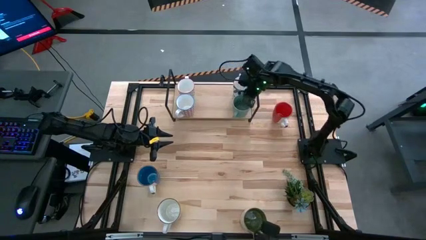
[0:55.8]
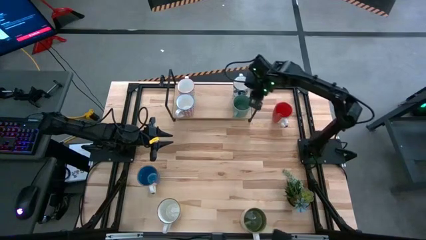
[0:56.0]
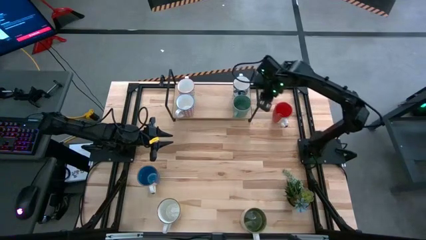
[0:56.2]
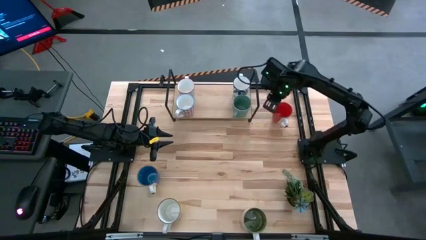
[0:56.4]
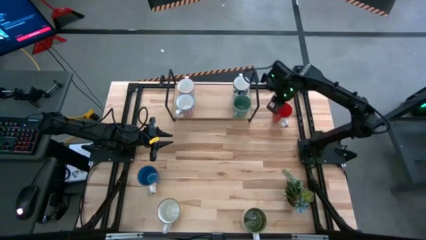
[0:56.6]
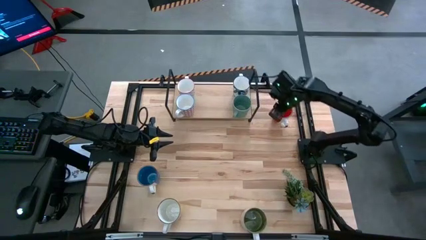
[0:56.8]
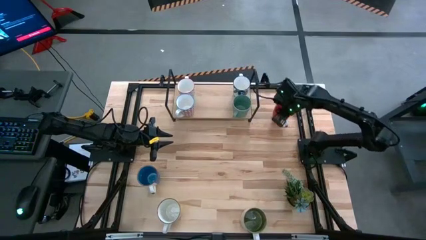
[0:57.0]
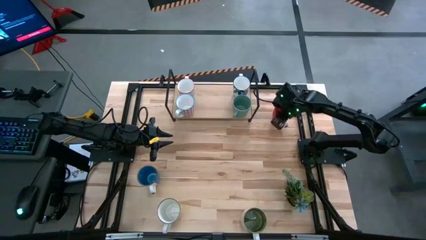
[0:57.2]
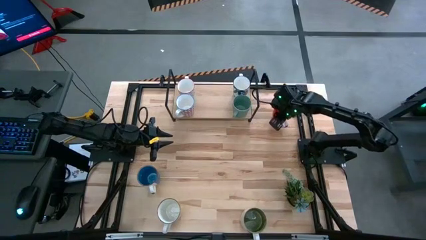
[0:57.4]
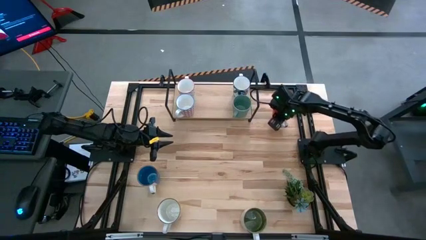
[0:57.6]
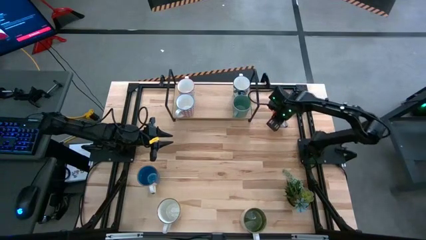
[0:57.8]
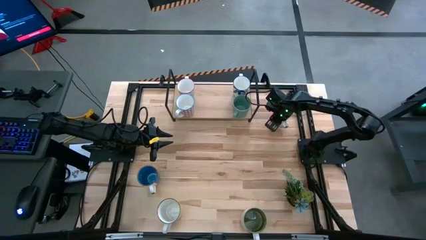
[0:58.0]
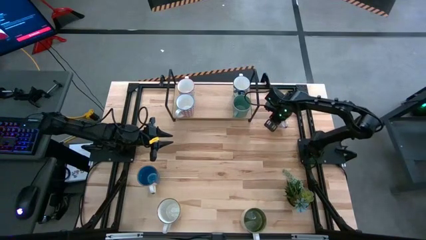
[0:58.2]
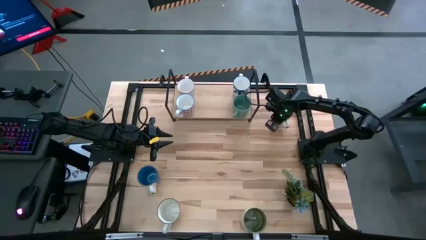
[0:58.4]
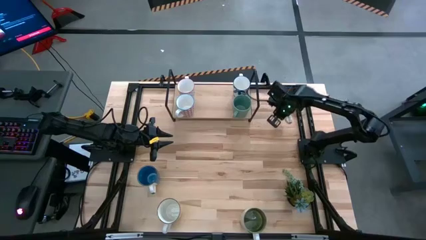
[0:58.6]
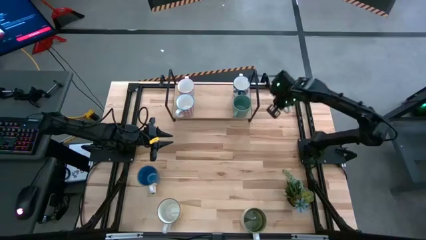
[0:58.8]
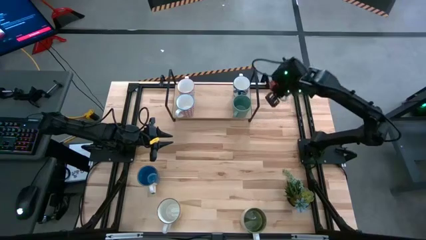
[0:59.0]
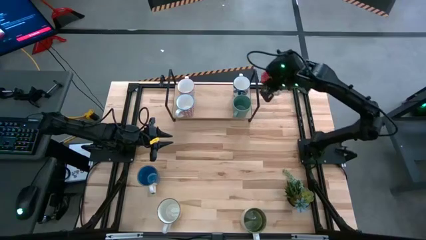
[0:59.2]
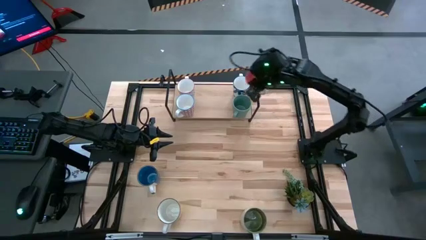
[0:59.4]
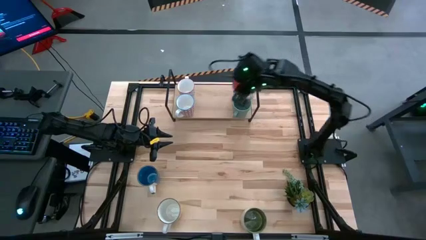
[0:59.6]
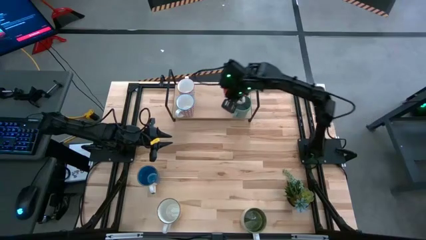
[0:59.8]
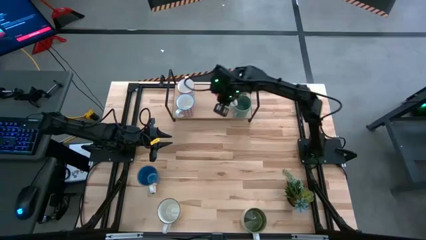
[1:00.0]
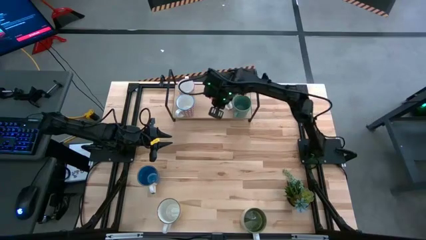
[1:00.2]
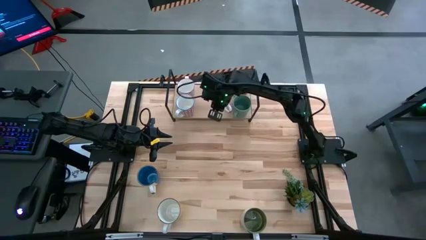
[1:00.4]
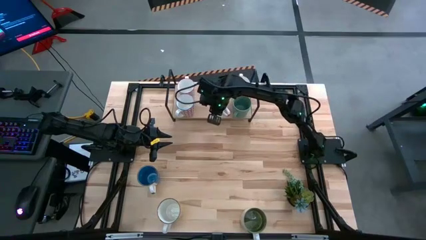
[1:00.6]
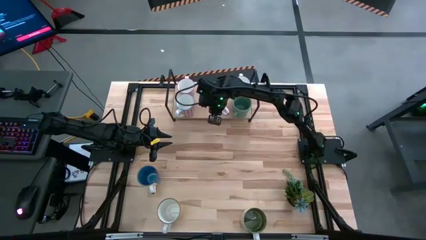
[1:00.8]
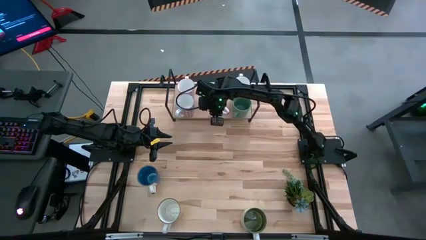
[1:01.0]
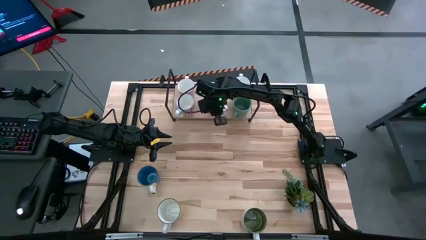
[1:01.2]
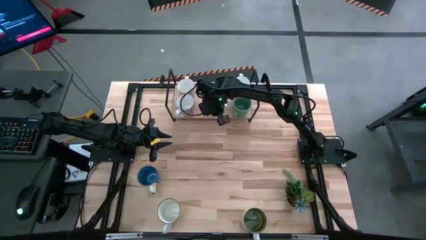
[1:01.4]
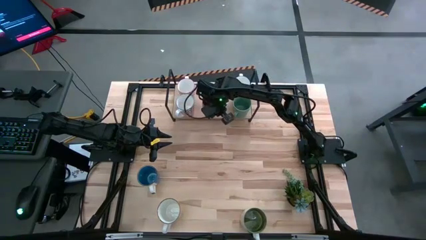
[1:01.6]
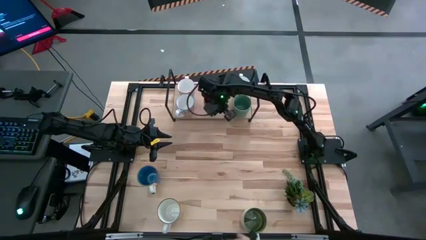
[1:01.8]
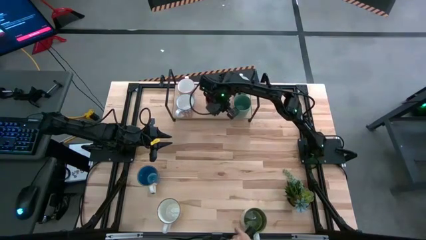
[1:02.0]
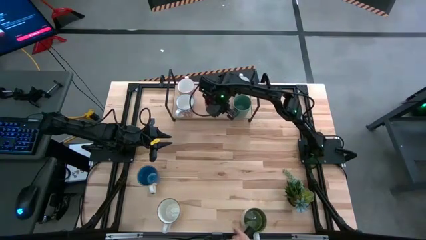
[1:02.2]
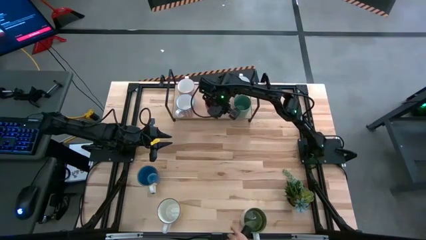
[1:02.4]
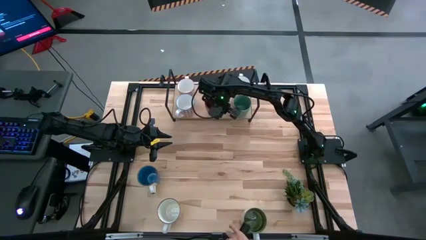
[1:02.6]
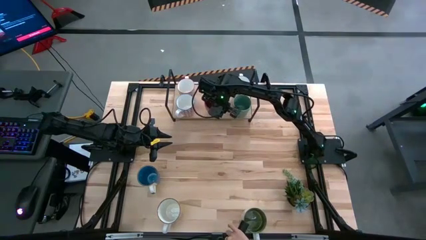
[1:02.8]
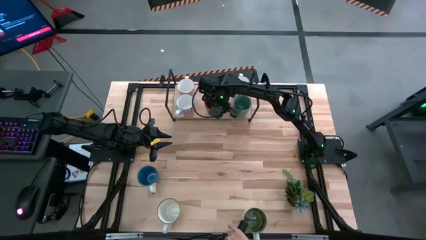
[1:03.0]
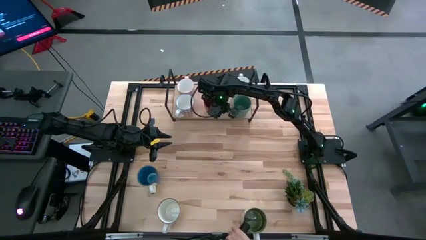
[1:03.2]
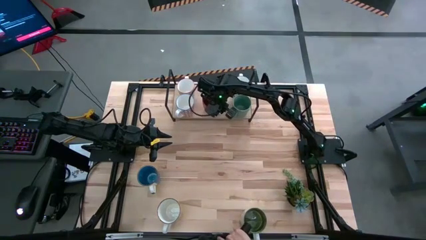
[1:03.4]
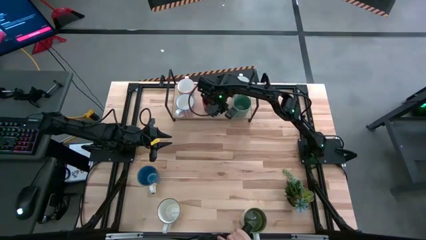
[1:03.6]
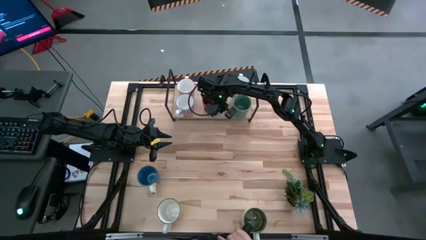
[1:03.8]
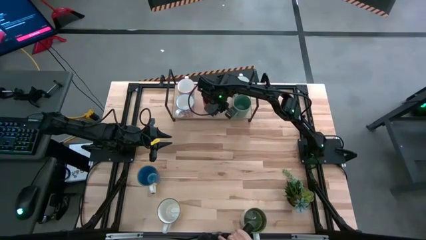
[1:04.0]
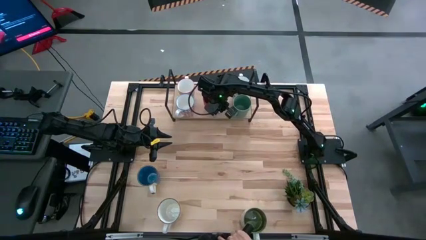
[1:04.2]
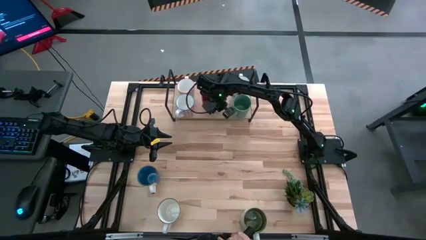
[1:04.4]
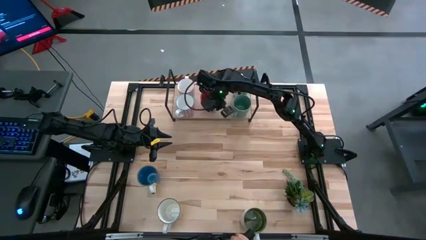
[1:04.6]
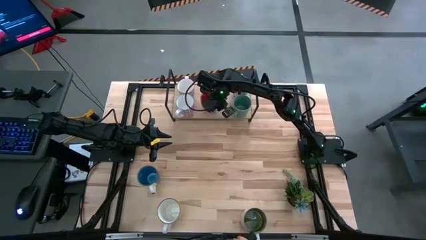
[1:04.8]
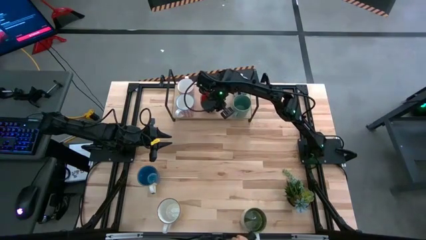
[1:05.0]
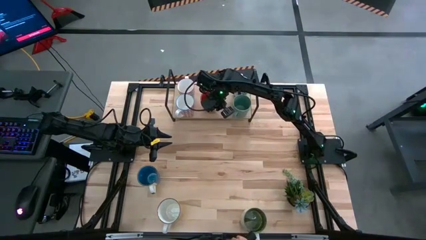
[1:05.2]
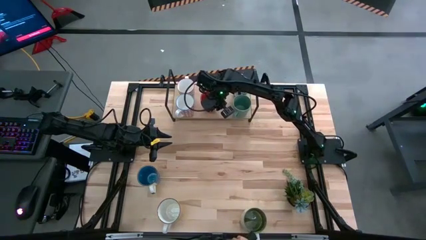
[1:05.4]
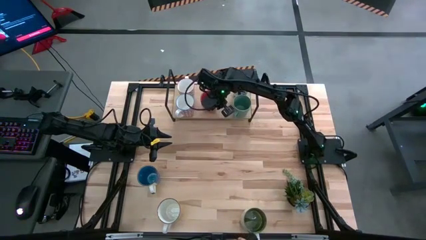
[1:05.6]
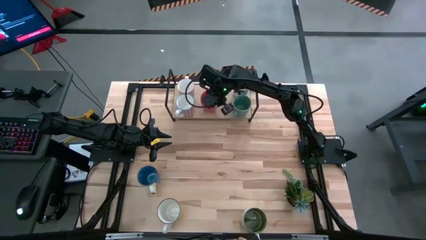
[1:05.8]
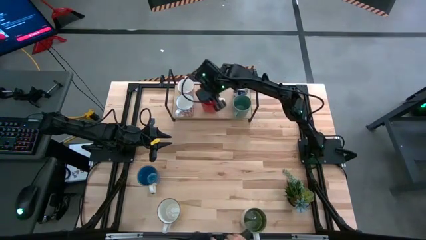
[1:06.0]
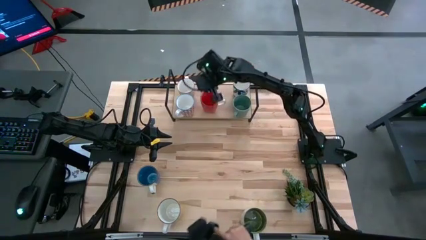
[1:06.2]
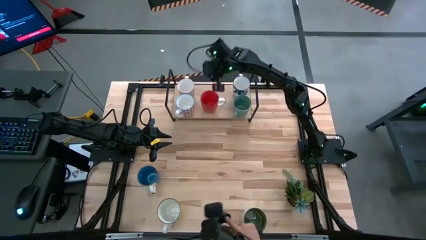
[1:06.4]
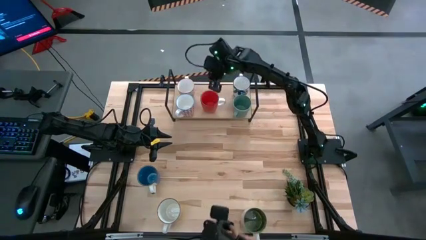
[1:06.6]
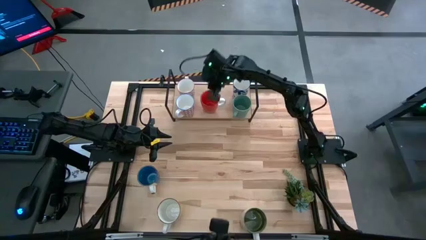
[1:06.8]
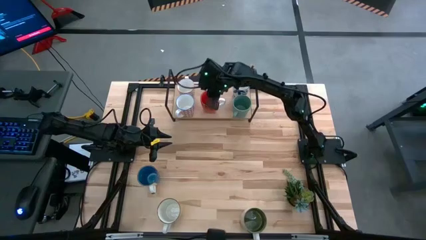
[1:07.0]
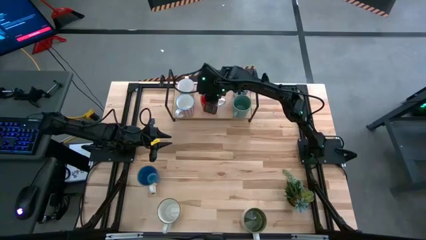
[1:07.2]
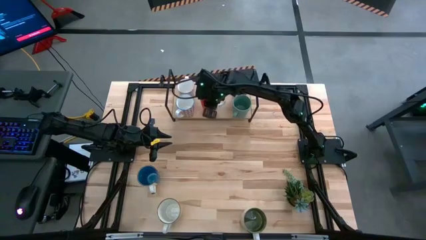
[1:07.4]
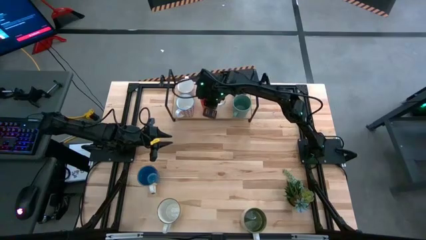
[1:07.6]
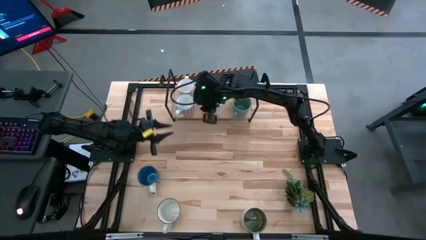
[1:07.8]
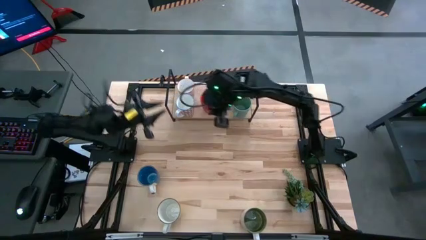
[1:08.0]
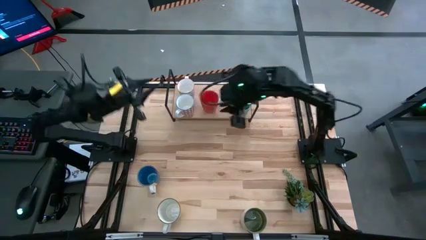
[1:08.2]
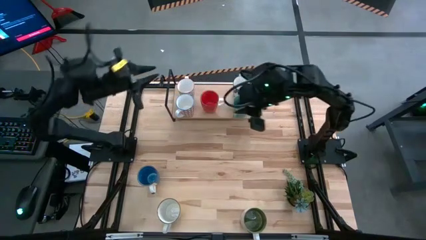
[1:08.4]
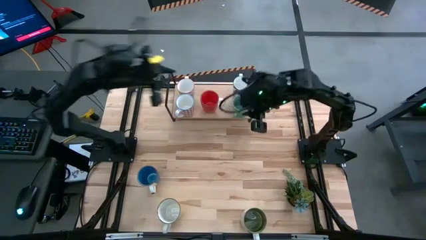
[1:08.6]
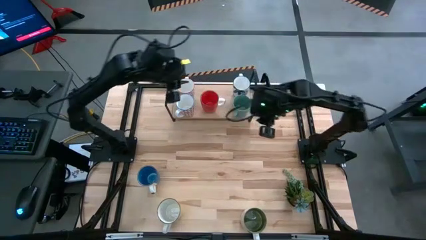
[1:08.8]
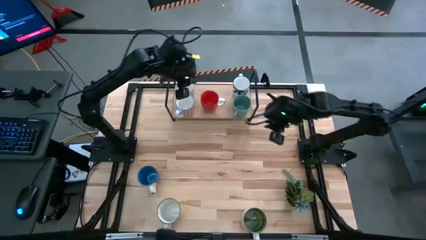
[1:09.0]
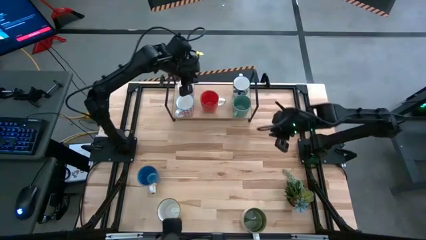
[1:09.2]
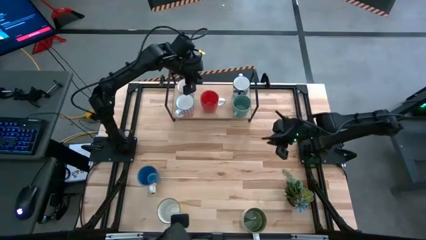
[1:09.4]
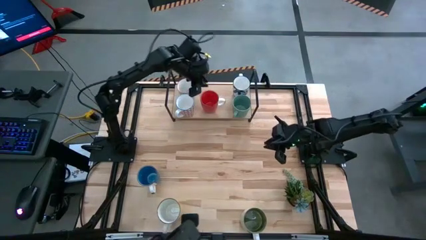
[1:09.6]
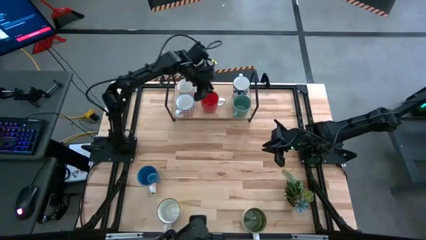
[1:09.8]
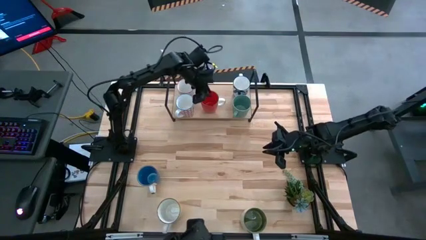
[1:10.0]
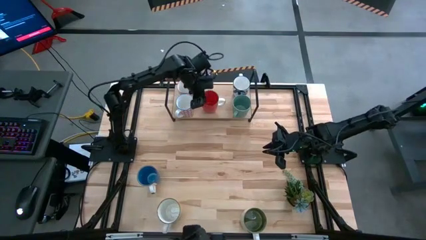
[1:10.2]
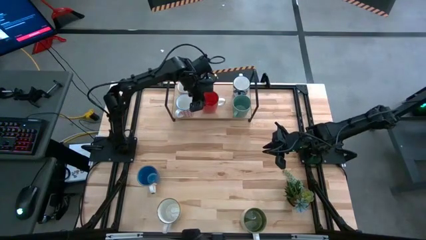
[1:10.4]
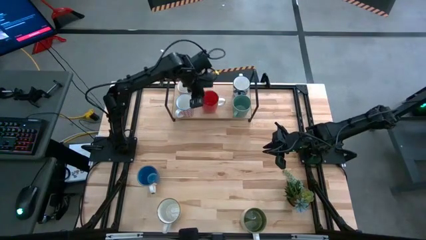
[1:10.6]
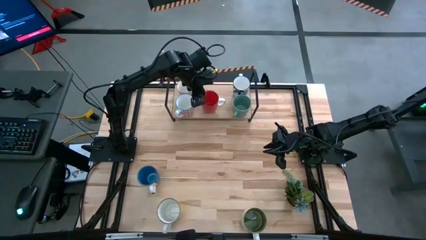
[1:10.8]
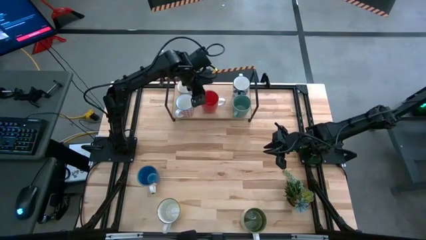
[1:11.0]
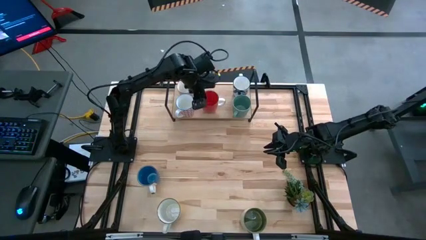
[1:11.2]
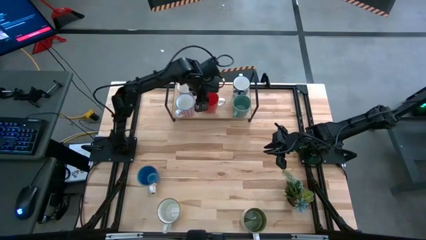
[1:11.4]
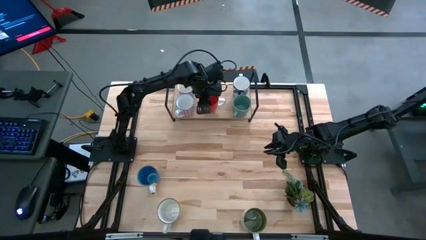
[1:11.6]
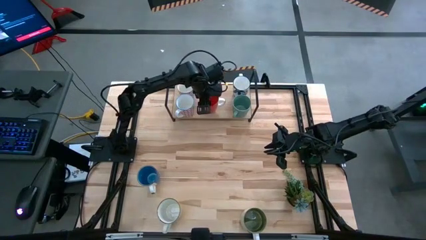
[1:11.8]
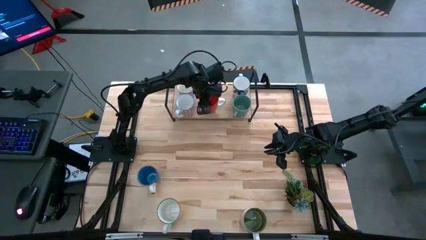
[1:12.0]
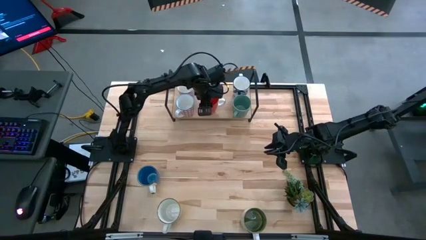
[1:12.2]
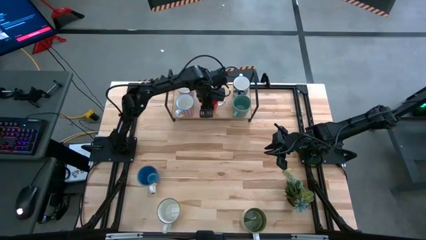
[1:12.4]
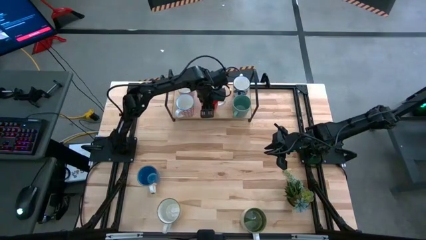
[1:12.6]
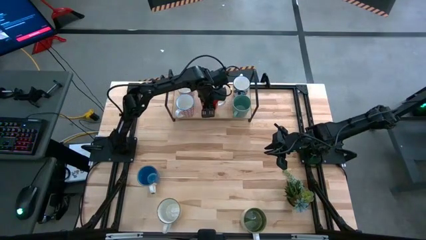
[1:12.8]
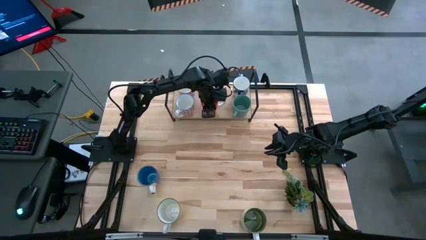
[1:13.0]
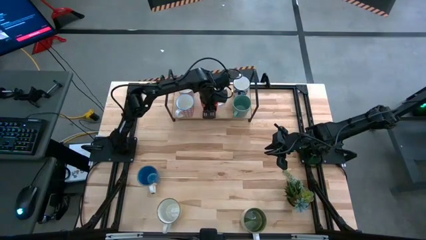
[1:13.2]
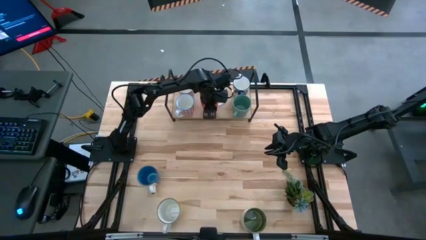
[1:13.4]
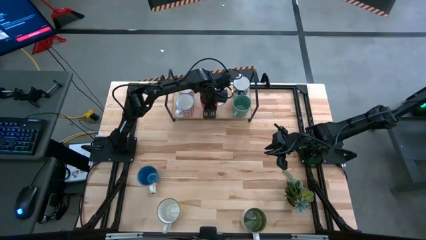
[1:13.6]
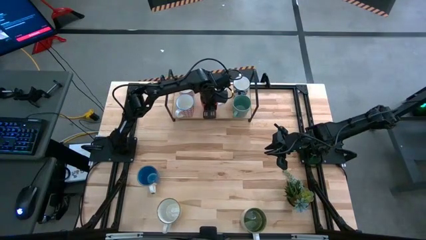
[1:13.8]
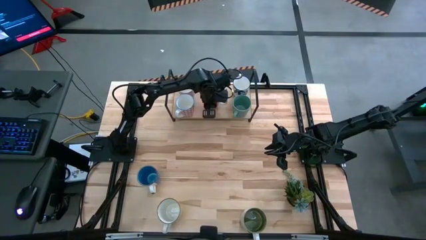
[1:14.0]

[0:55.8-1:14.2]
Task: Place coffee mugs
Put the red mug on the shelf
